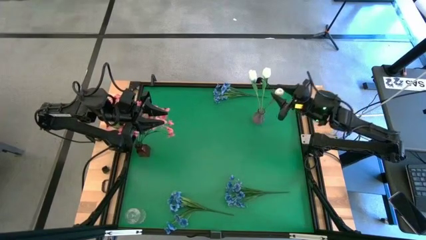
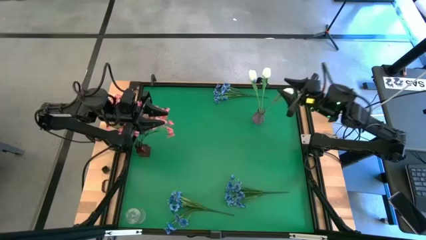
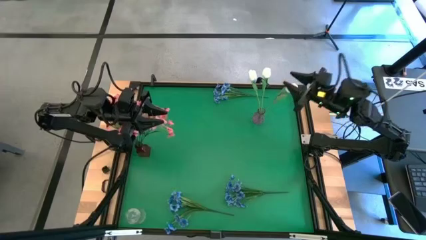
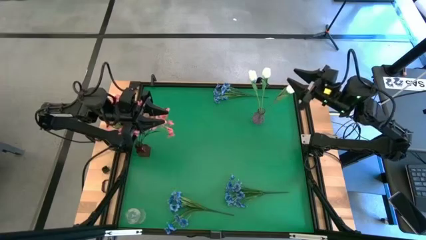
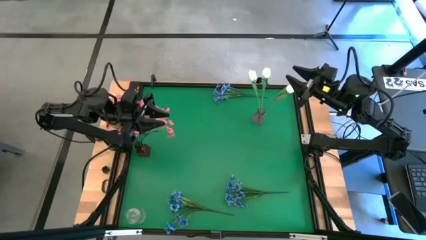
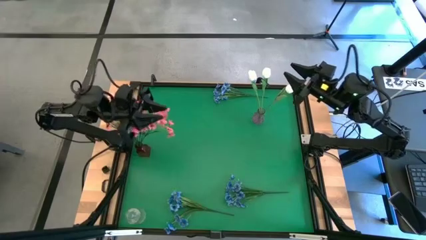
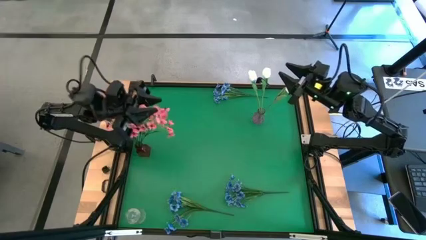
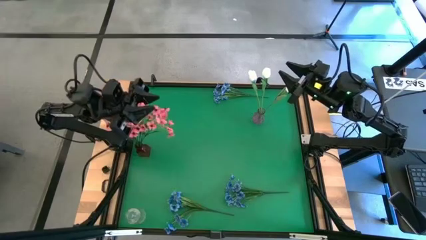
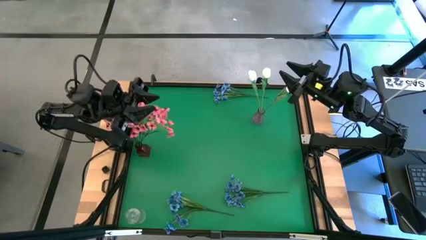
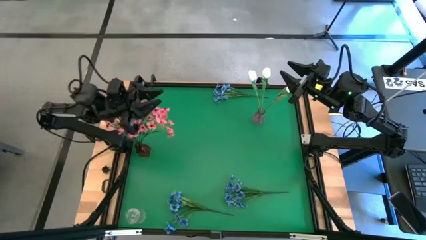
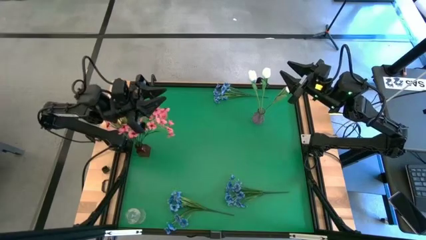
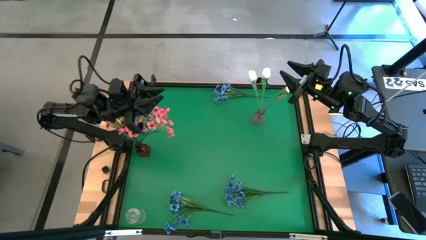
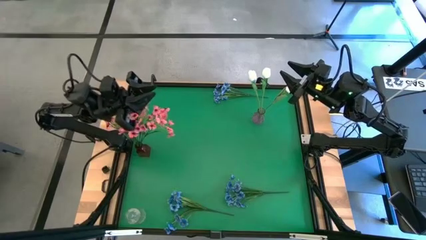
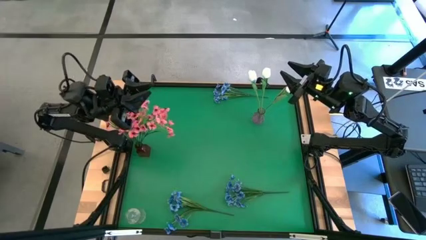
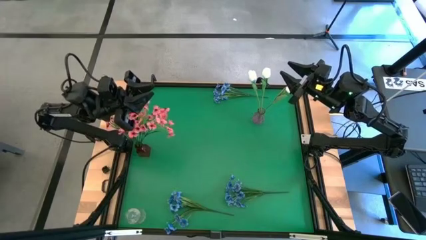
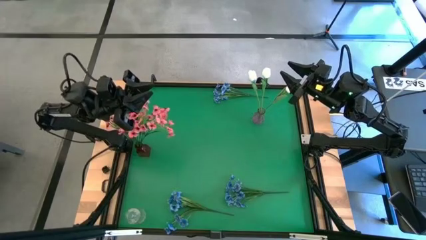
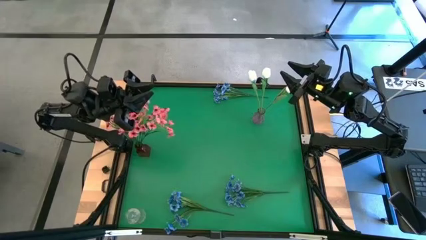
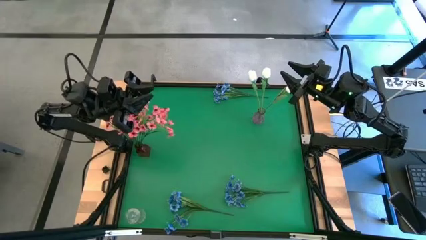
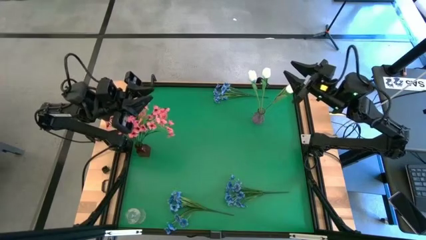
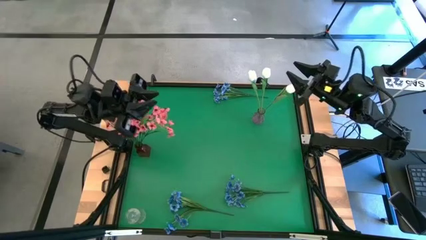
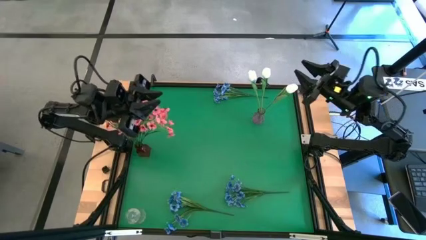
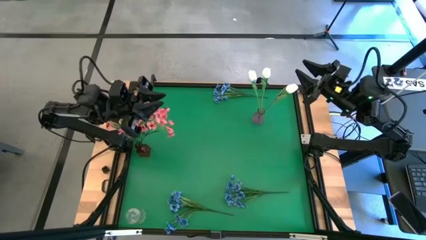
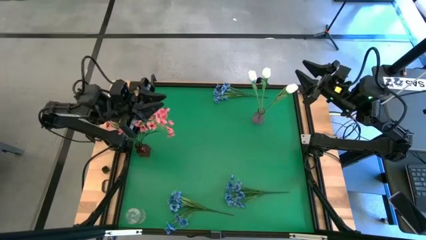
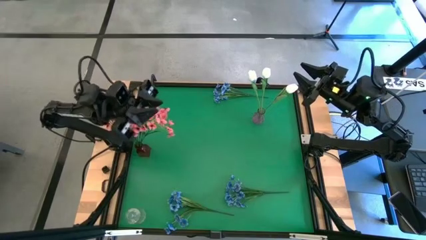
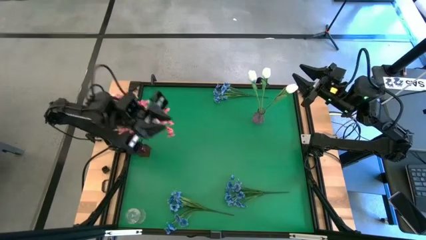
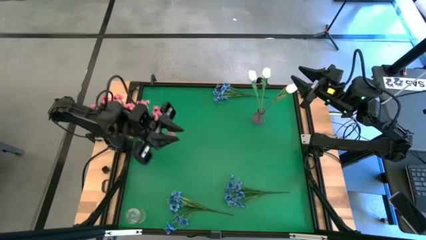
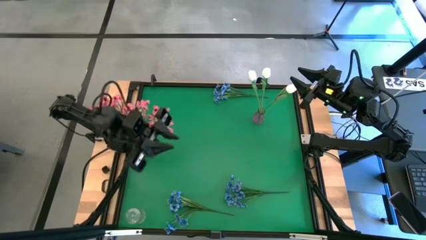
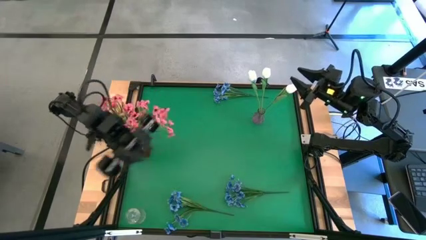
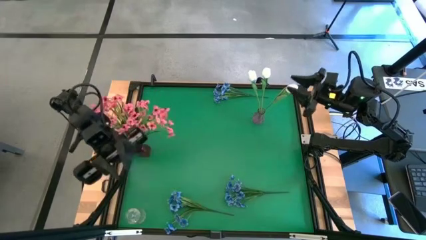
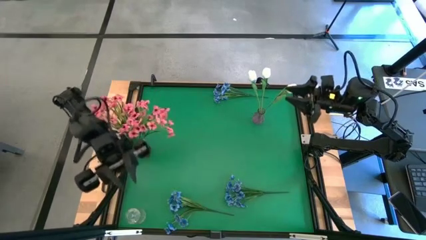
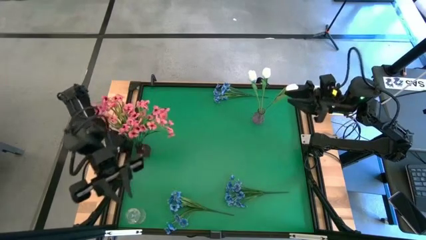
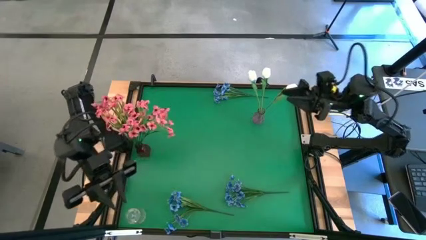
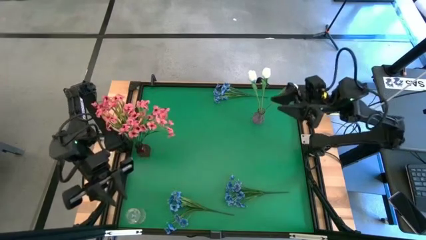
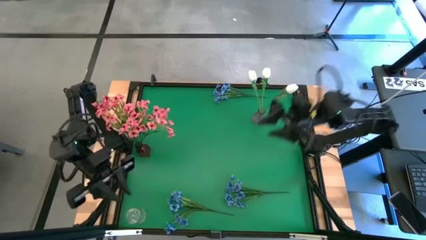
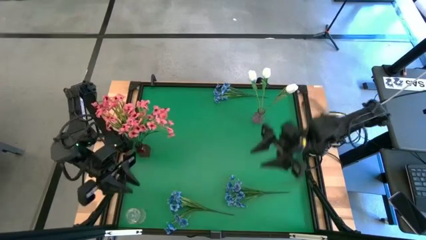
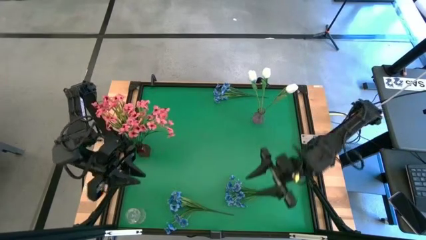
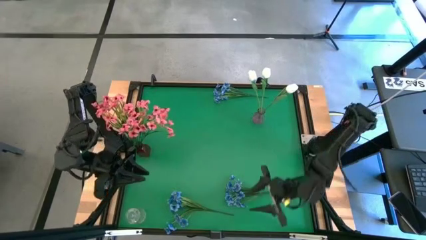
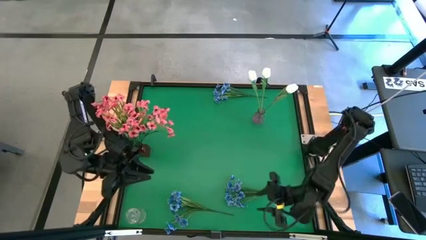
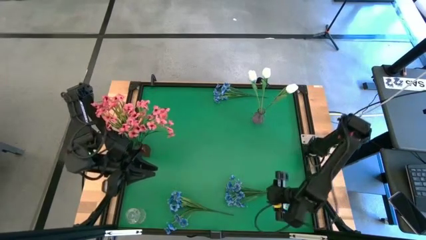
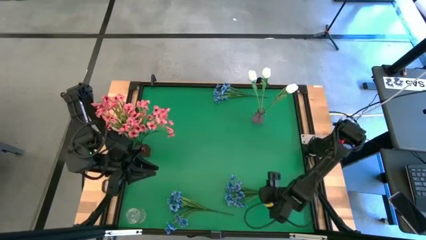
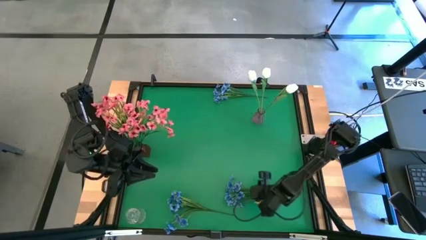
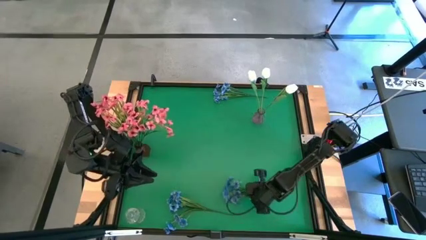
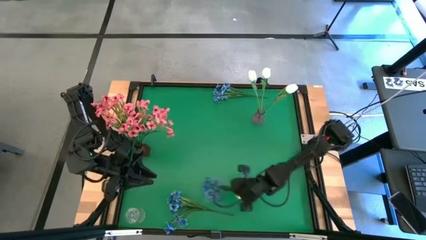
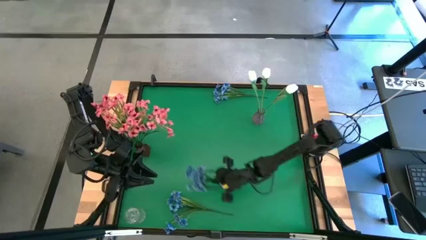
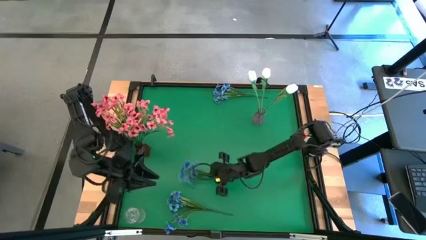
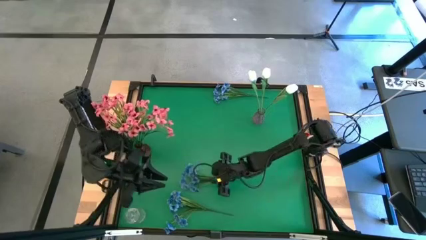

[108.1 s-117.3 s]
Task: Sort flowers into vase by color
Move the bottom right blue flower to the bottom middle of the table

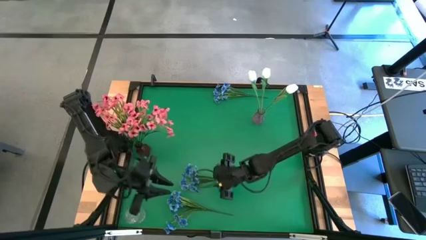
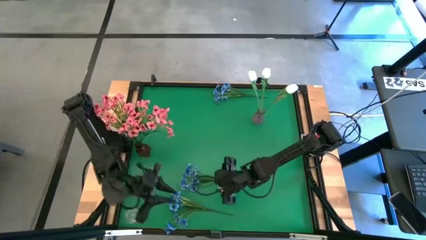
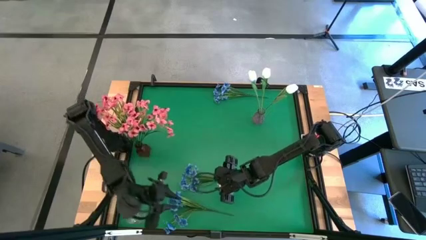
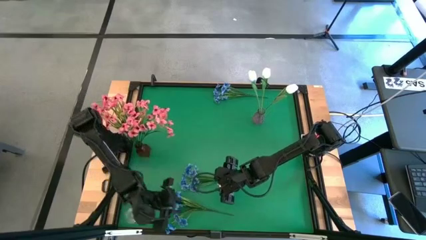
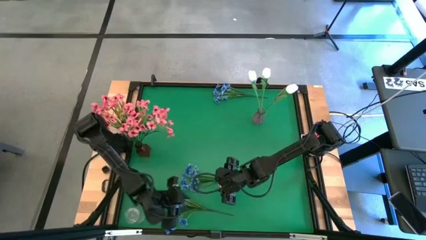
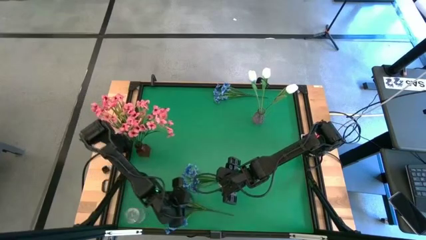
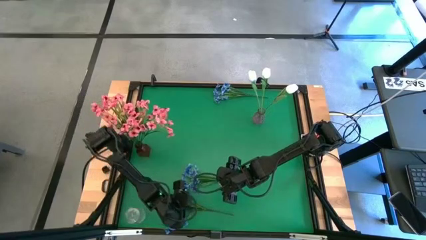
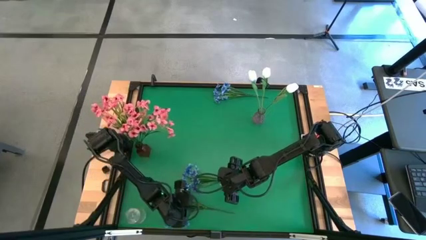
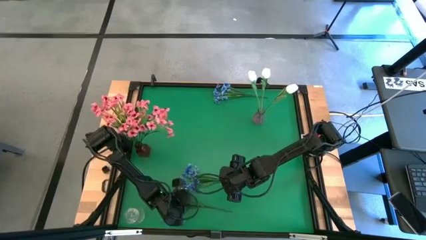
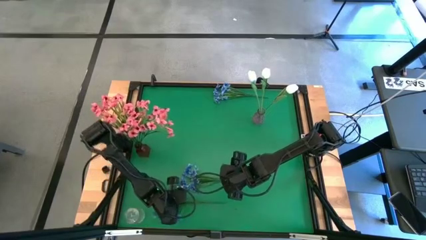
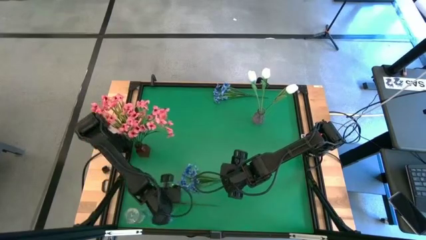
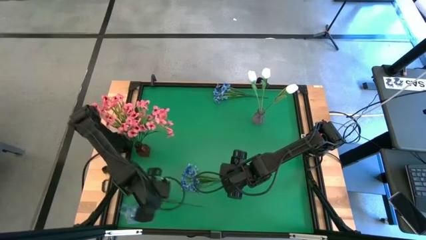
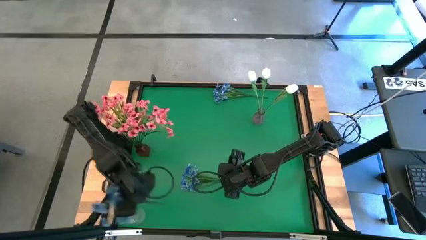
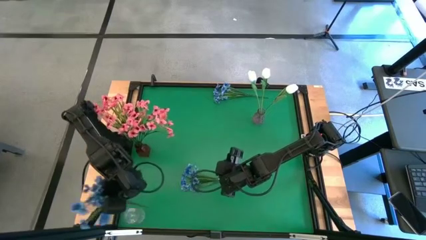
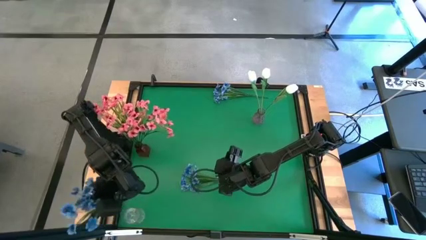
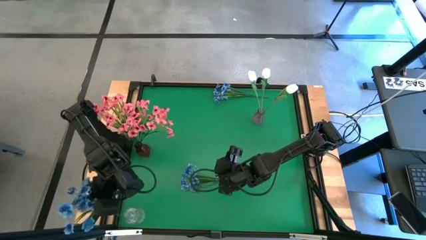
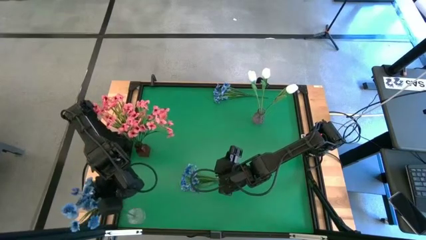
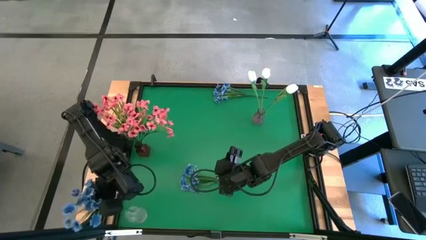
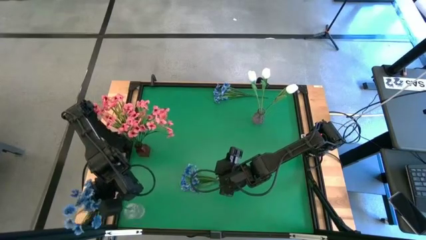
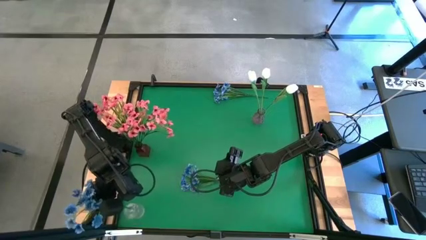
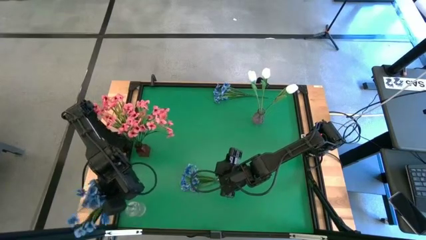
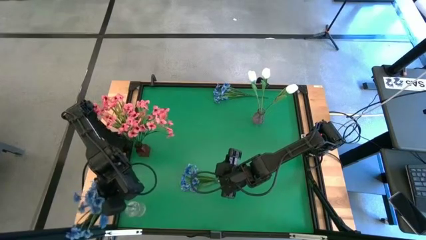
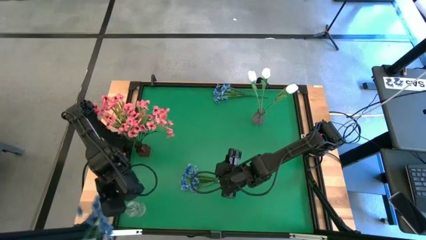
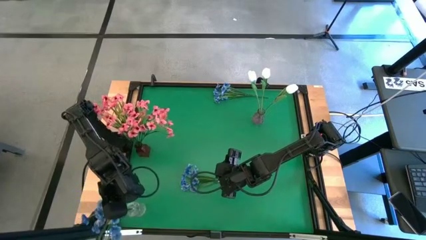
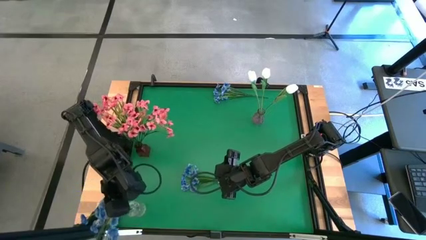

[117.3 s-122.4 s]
Put the bottom left blue flower into the transparent vase

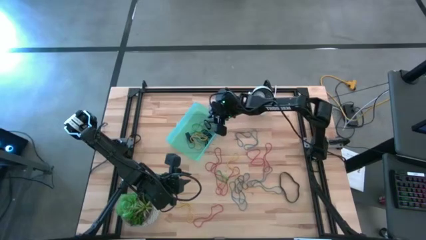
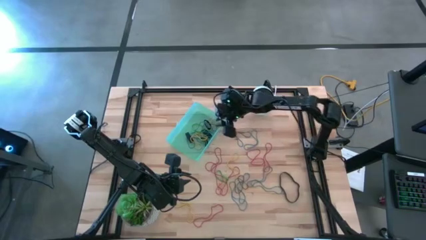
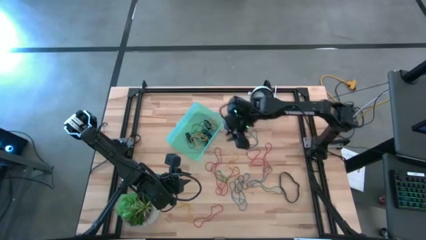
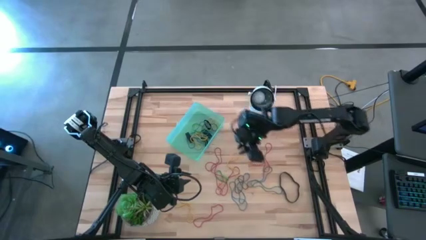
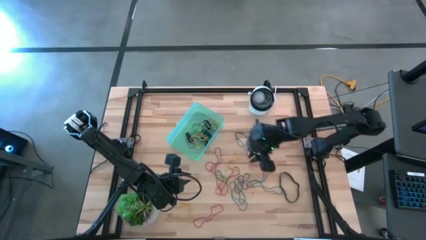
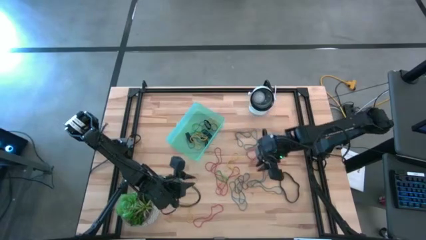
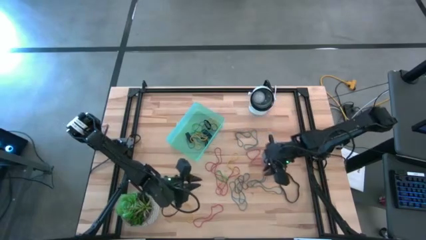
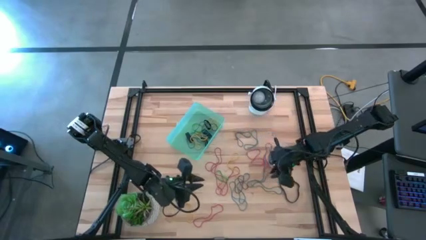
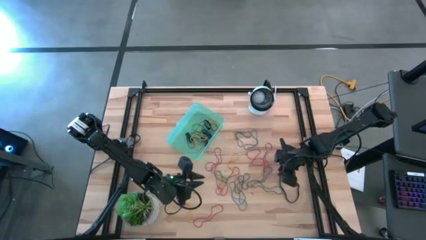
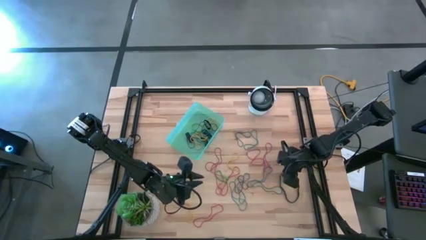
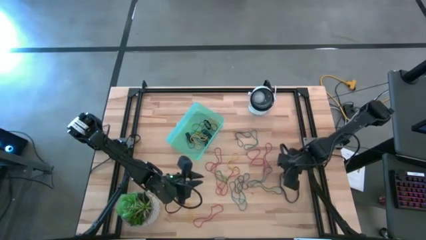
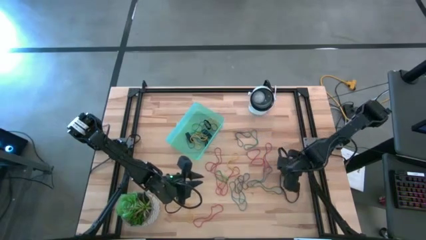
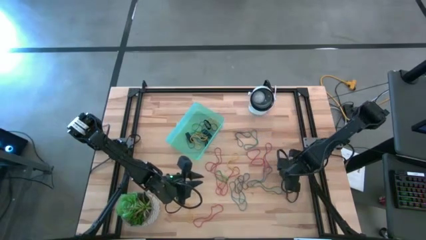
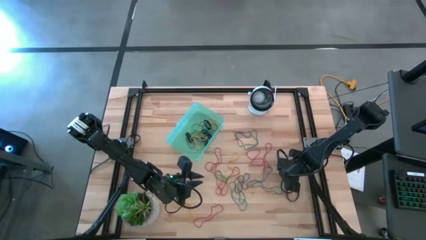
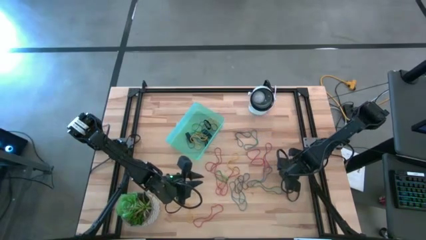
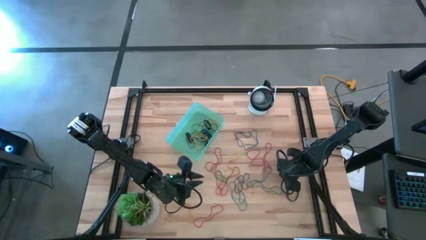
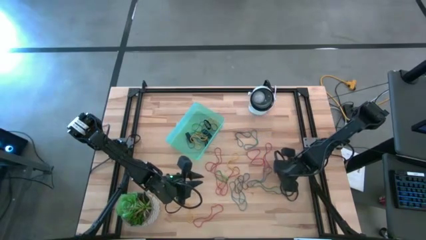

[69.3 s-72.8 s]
Task: Pick and place rubber bands into bin
Put the black rubber band into the green bin
